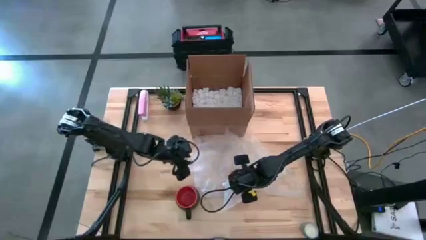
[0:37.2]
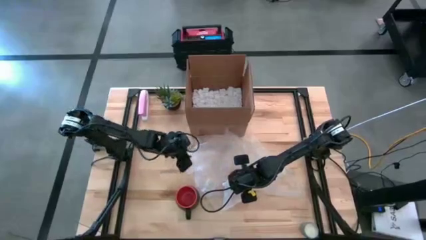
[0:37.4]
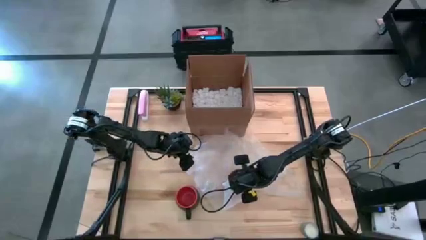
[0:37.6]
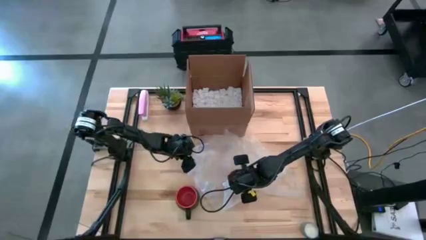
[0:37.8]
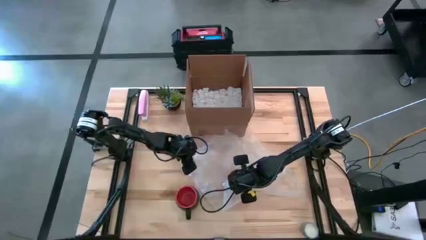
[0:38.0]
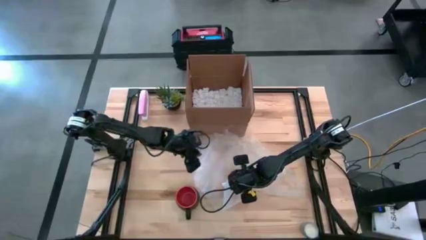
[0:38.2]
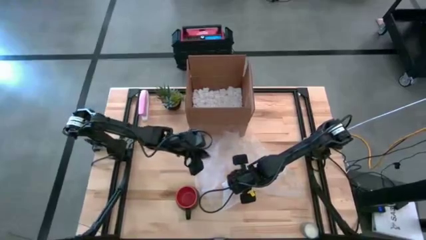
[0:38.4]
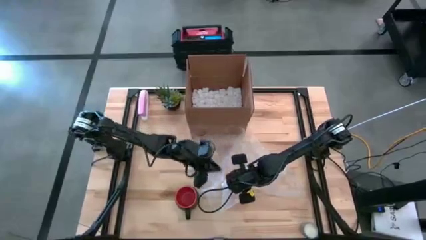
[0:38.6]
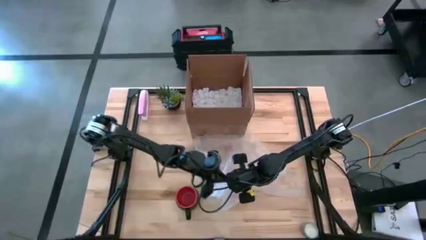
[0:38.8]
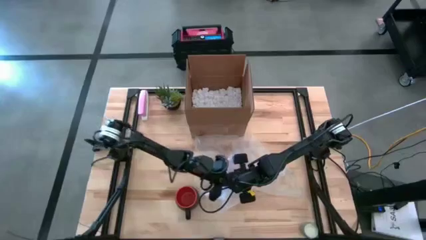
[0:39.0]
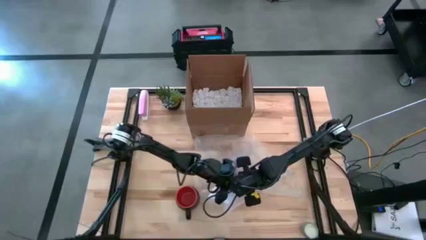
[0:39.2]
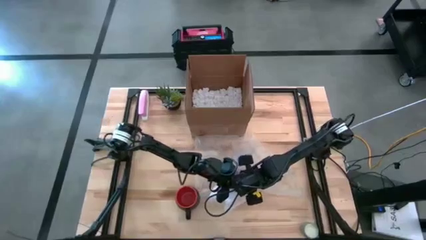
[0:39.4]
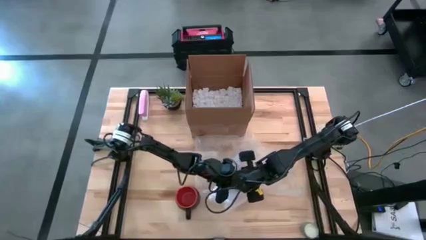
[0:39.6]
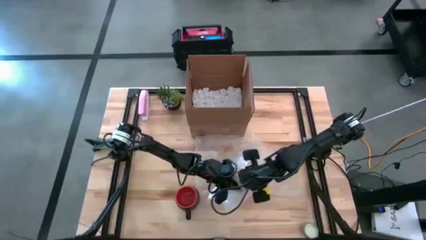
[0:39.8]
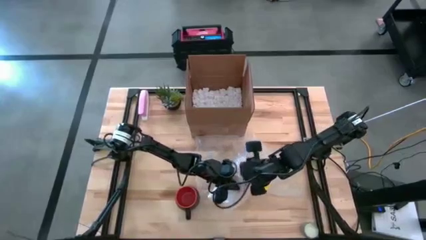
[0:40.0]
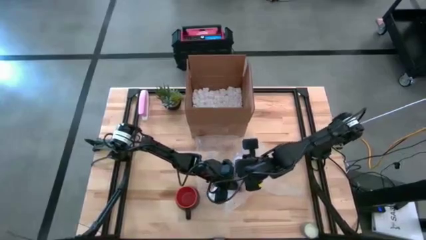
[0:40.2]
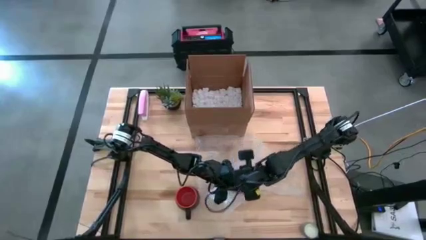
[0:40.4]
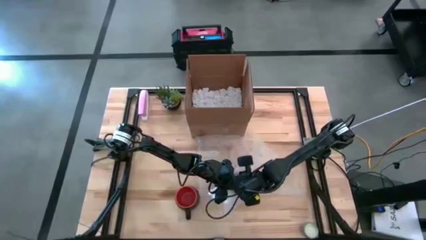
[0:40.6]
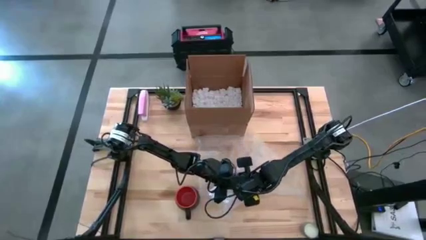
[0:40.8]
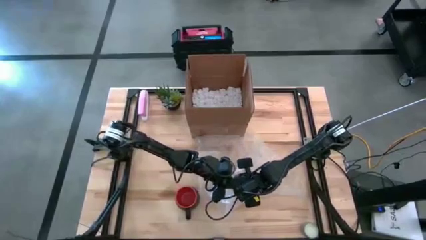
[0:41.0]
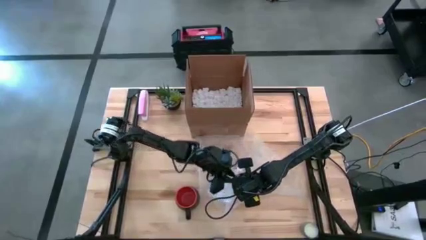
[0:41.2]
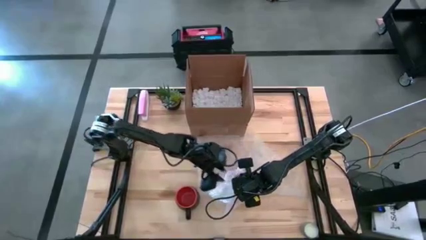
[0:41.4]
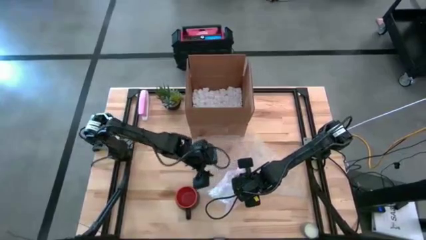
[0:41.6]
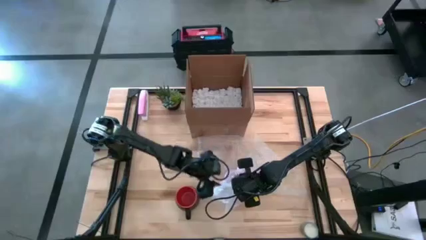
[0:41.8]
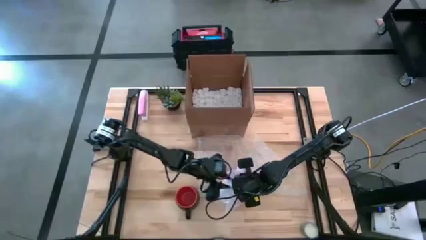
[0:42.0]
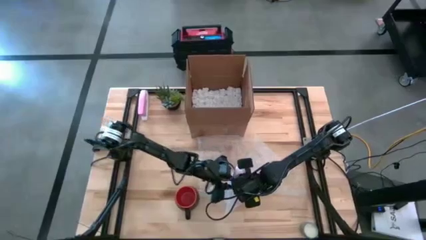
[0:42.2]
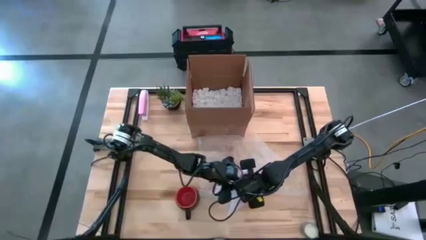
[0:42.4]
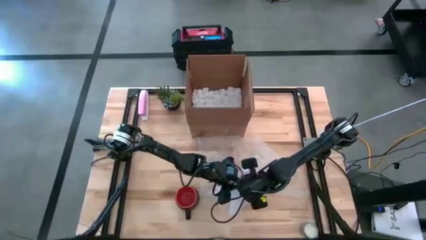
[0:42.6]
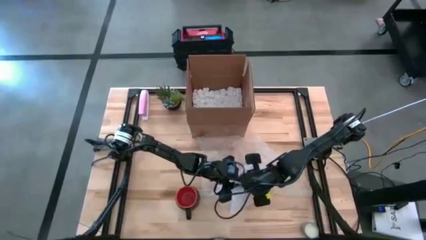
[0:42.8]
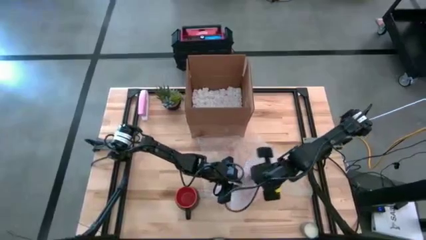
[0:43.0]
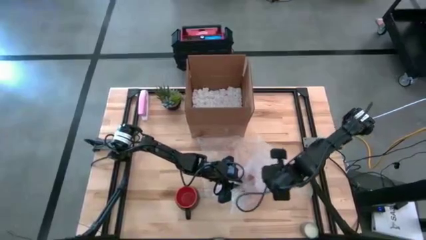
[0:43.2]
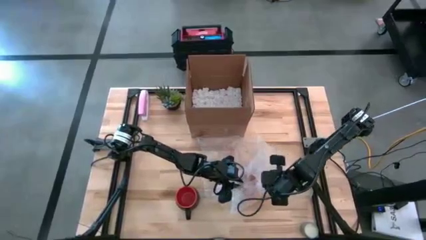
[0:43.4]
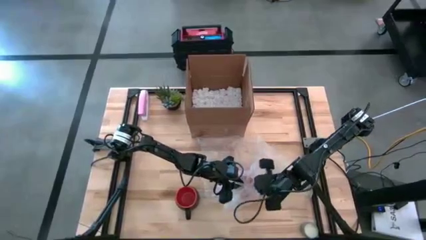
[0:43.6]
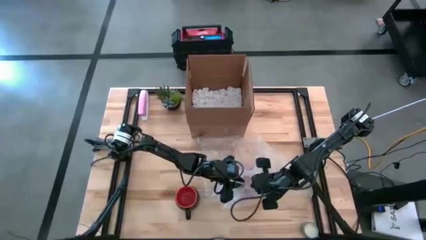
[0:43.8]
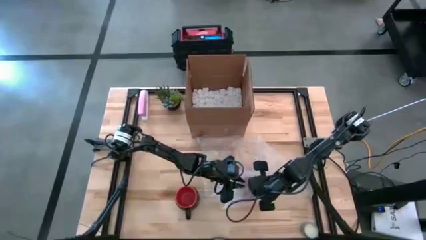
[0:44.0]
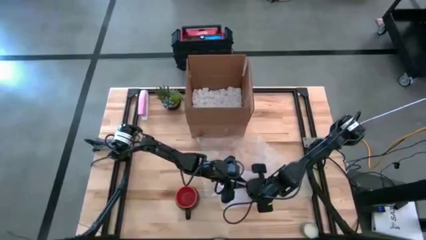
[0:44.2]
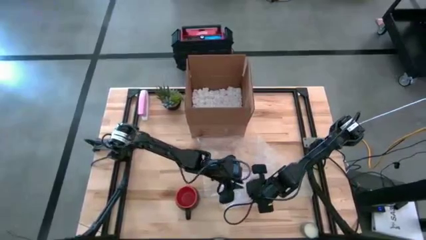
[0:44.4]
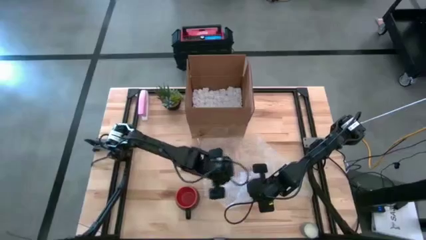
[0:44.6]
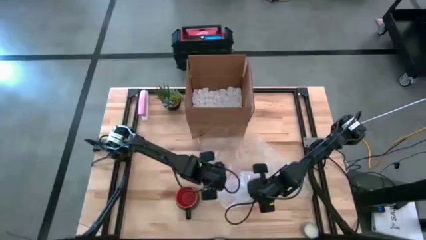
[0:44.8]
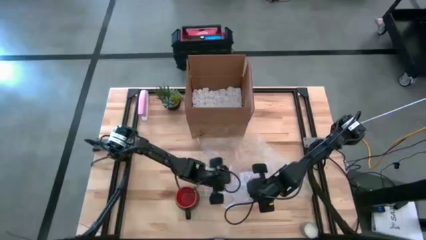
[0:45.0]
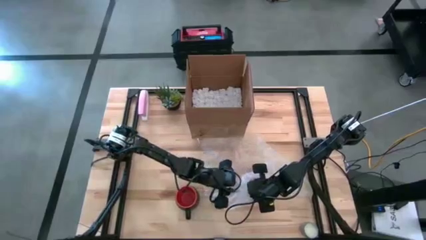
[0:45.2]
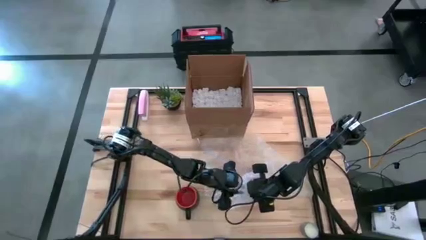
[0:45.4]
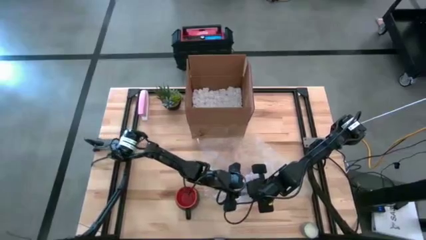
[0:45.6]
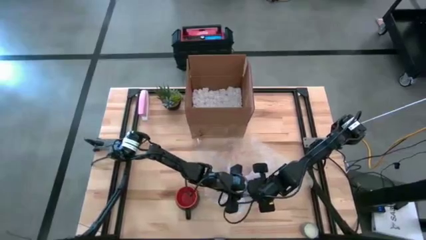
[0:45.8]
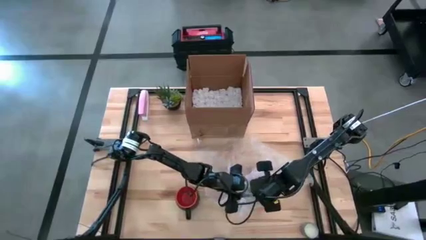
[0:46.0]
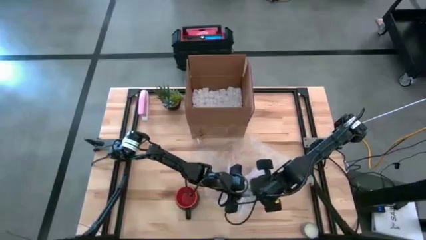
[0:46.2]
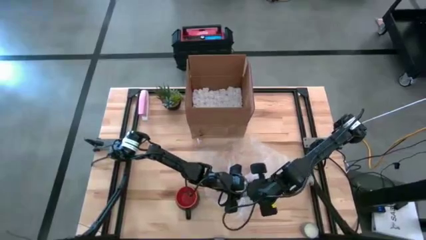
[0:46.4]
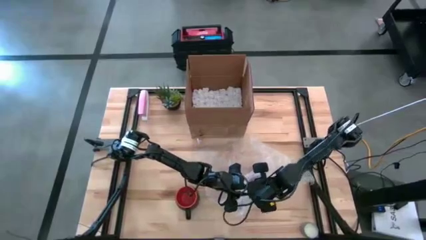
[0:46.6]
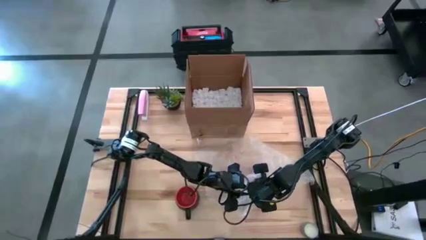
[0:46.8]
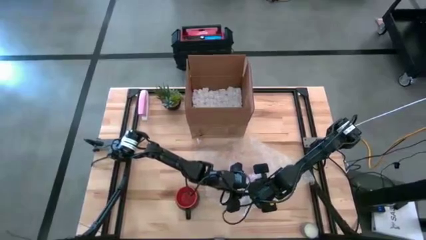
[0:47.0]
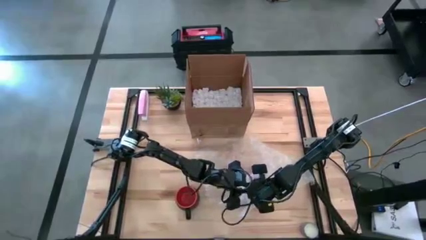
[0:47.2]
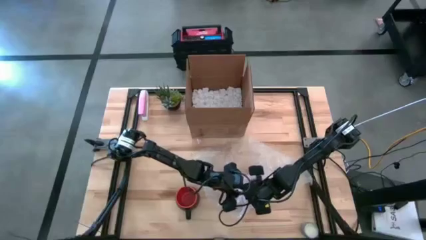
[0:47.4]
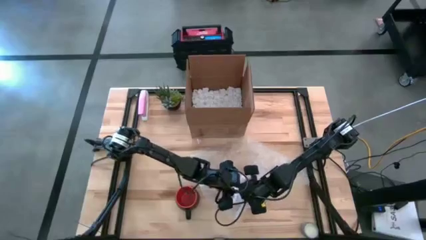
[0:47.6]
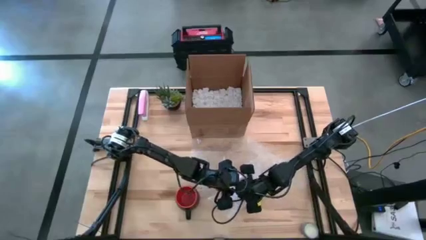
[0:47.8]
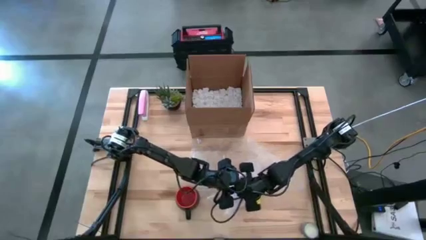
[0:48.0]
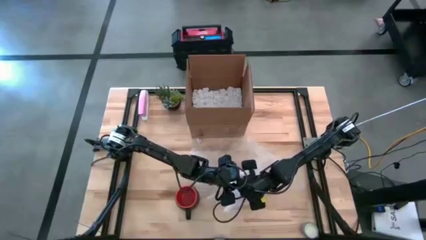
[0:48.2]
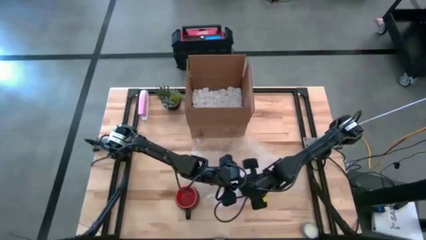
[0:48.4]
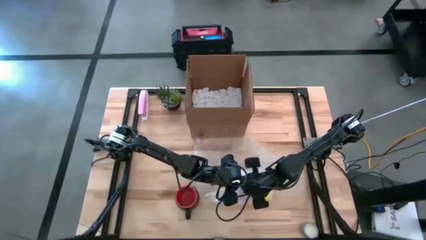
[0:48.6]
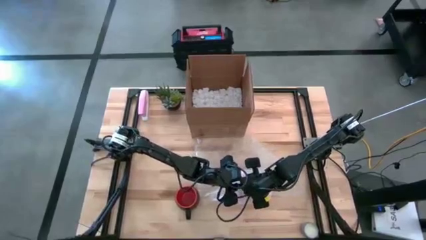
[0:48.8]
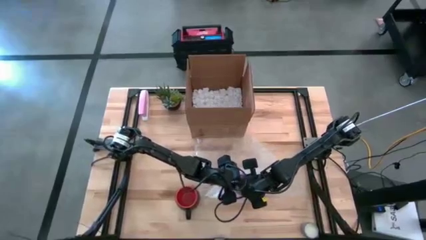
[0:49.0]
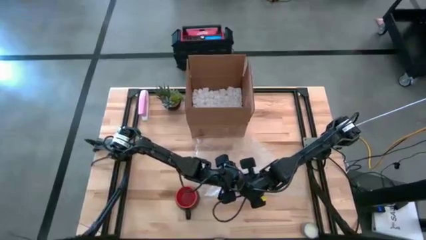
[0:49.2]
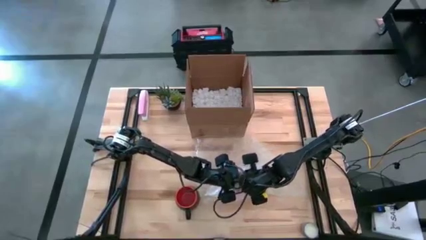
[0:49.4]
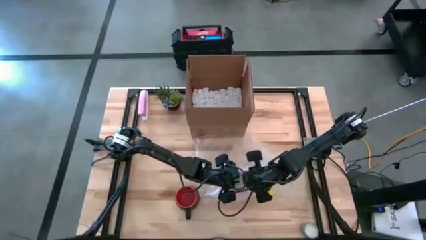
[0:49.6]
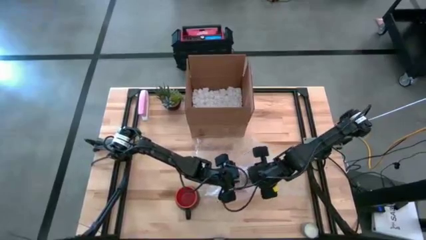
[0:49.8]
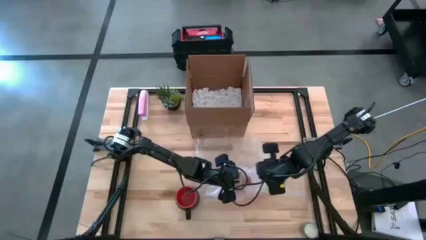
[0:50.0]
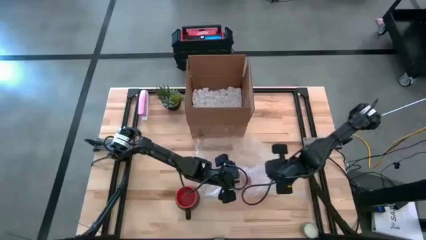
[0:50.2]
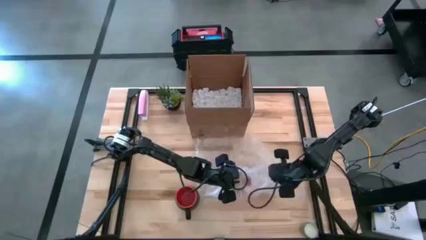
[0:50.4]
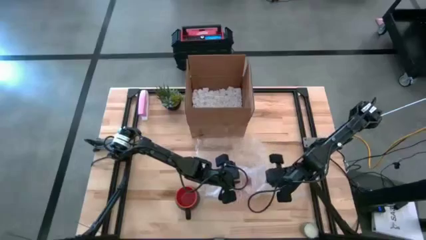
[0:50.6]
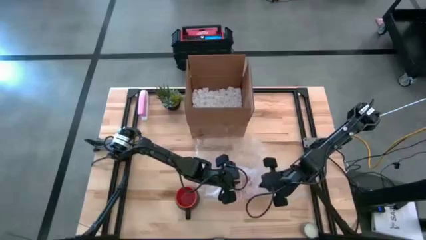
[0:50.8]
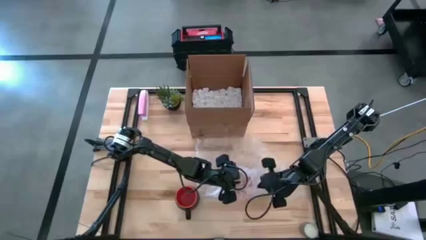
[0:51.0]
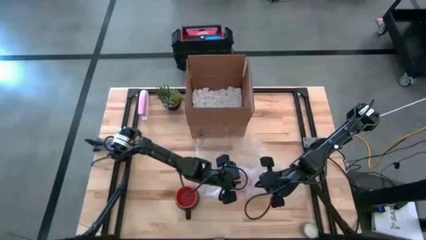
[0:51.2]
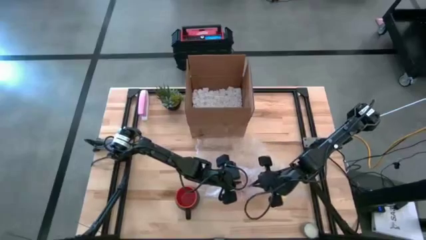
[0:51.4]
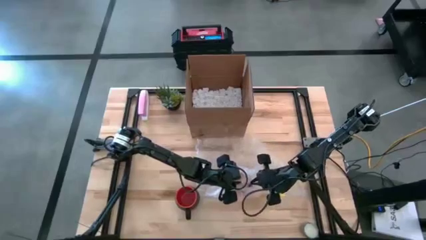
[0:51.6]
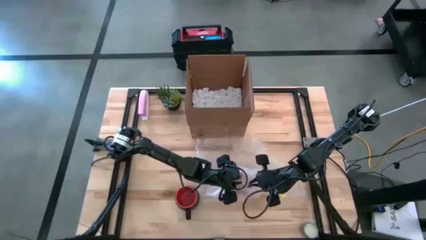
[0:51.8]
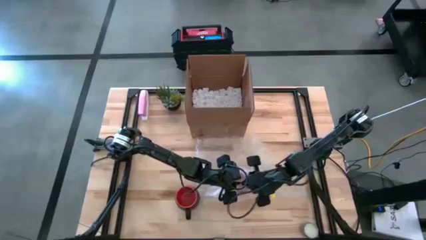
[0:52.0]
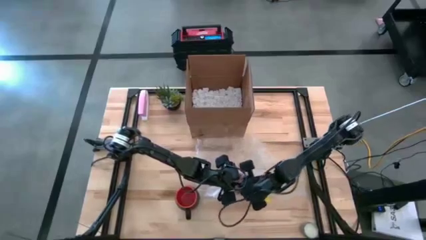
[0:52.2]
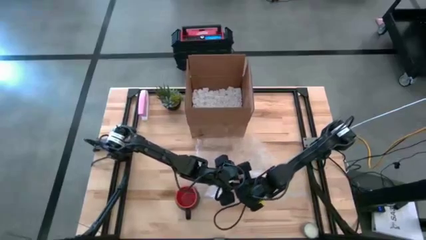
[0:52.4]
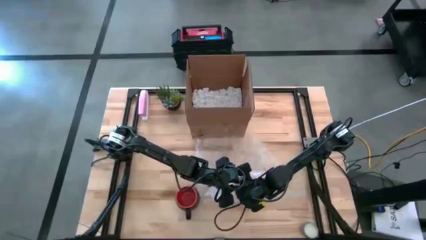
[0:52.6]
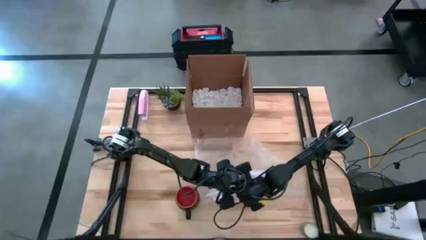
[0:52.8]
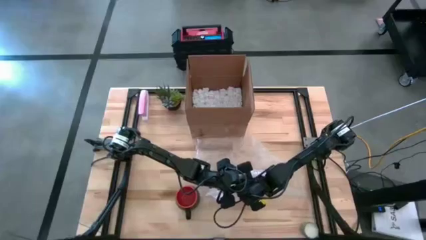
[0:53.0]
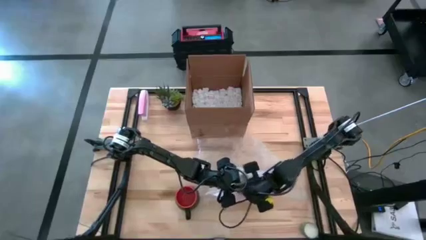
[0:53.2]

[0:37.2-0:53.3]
Task: wrap mug
Wrap the orange mug with the bubble wrap on top
